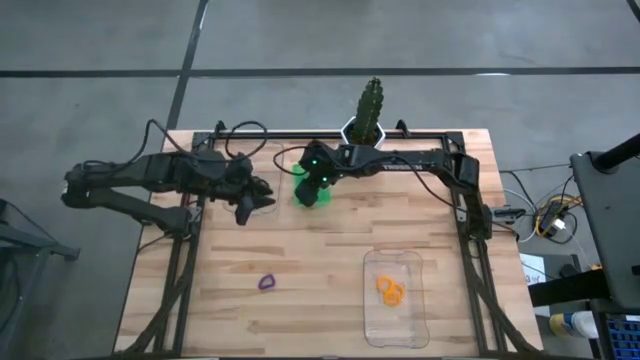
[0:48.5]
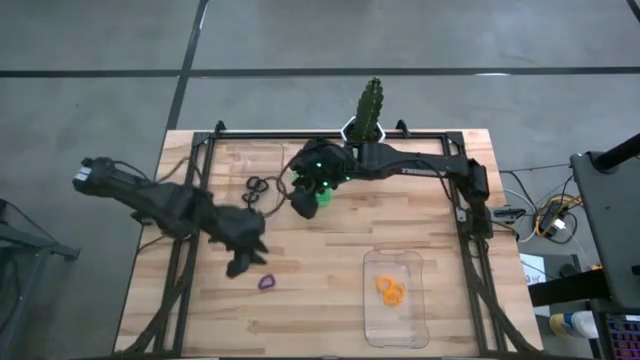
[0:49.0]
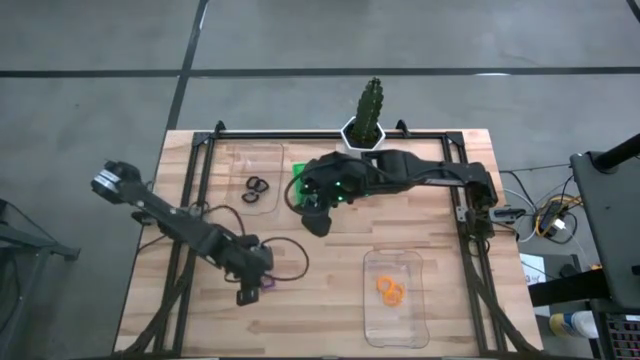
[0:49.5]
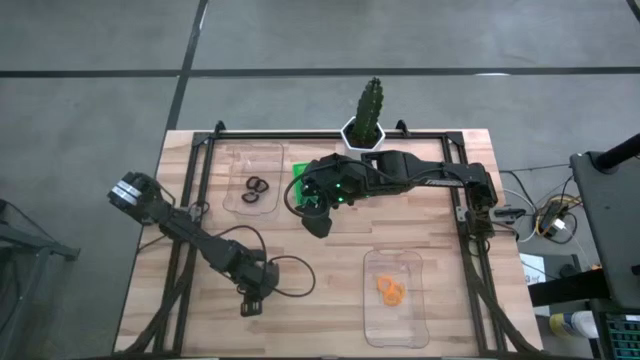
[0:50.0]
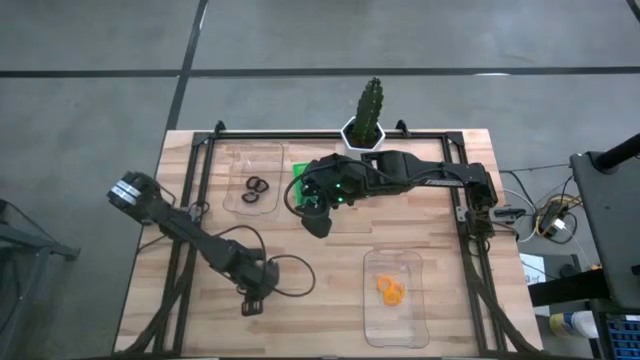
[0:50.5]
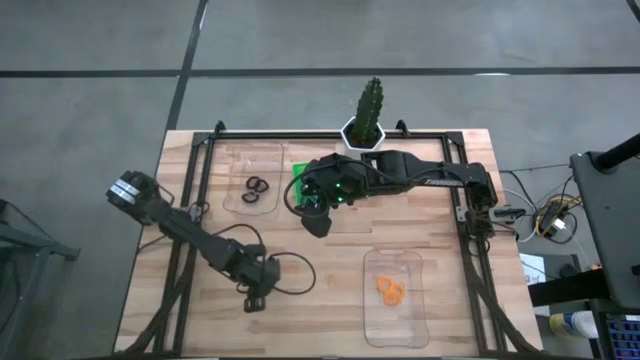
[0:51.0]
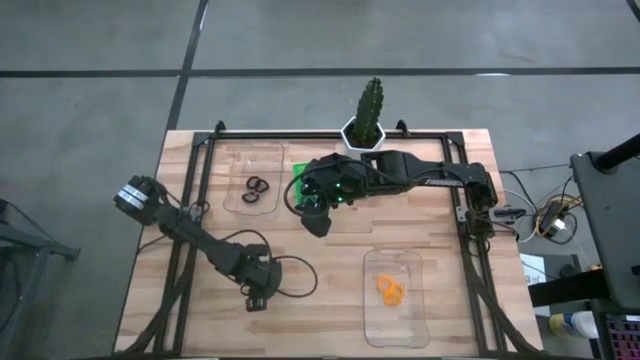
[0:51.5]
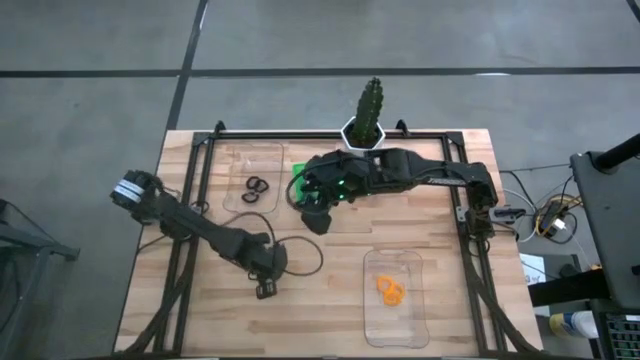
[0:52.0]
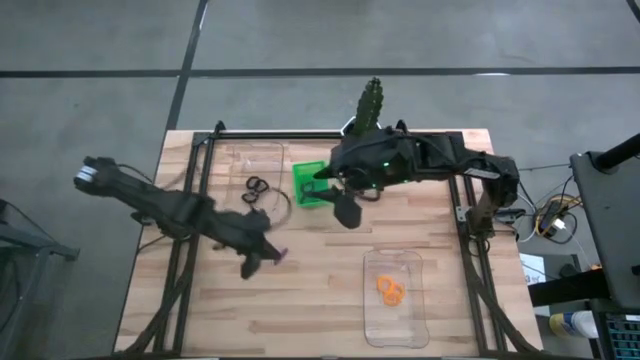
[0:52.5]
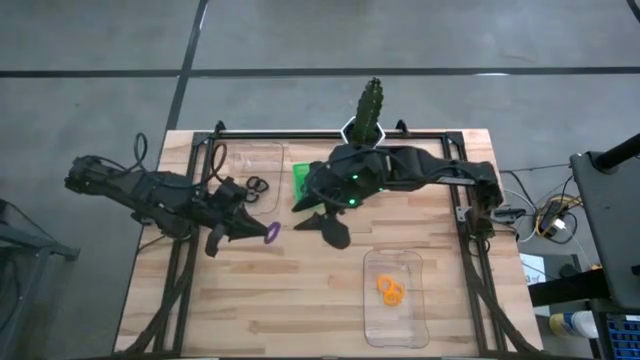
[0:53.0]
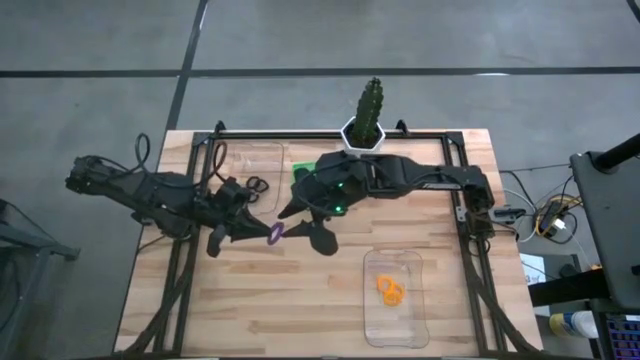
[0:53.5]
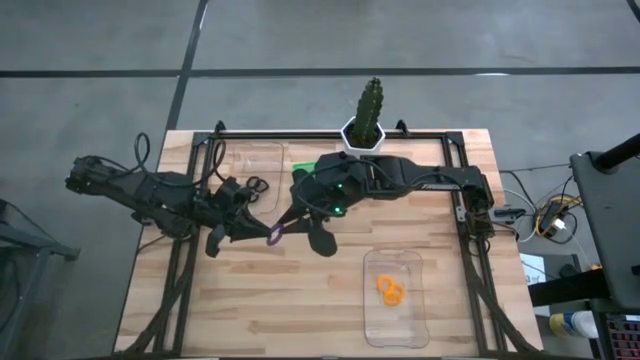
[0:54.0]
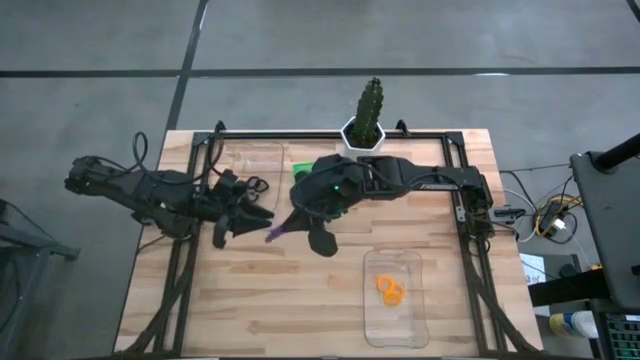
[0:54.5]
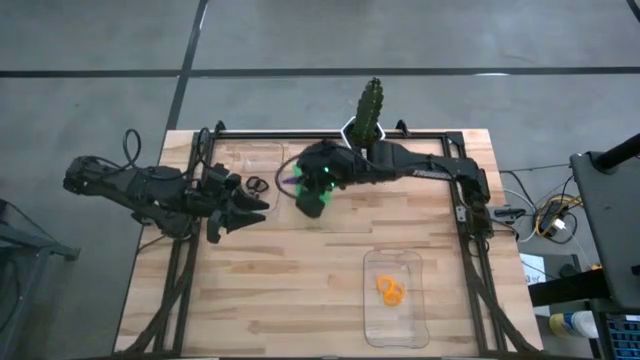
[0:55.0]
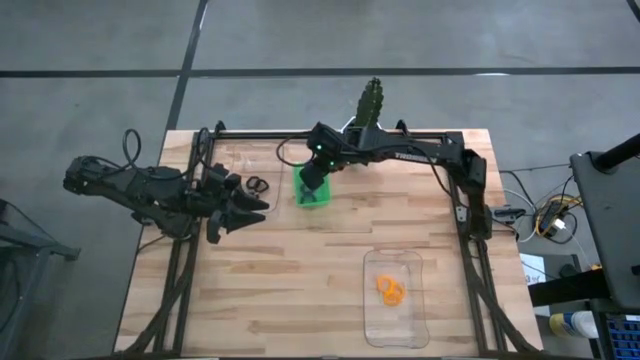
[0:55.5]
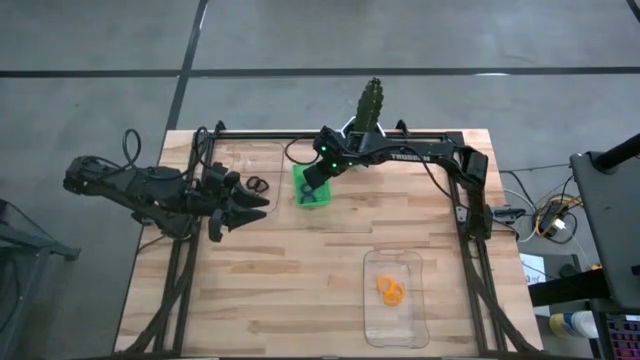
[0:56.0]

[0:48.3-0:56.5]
Task: Sort spring keychains
Put the violet spring keychain into the green bin

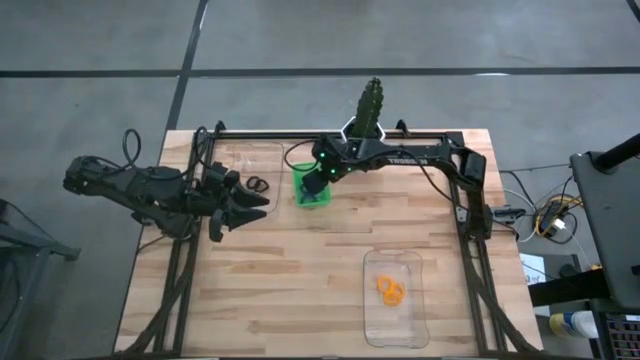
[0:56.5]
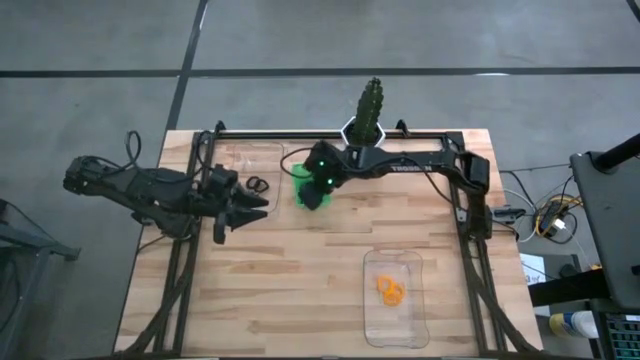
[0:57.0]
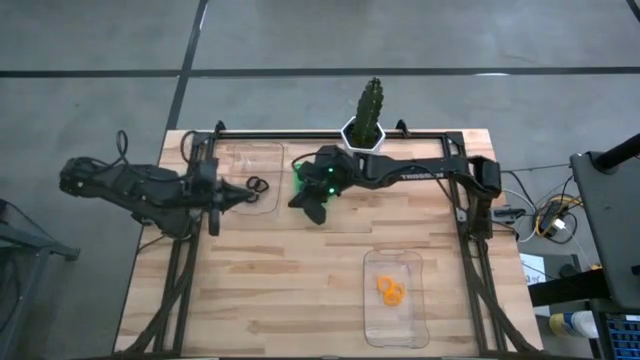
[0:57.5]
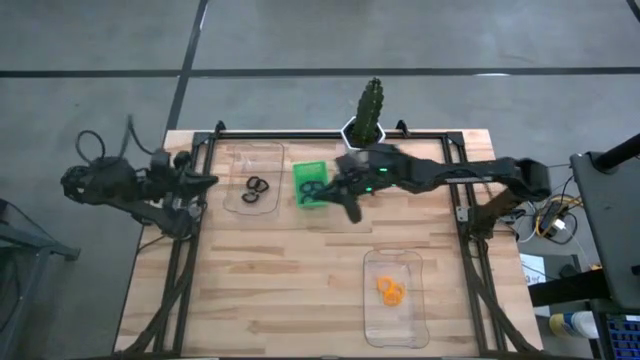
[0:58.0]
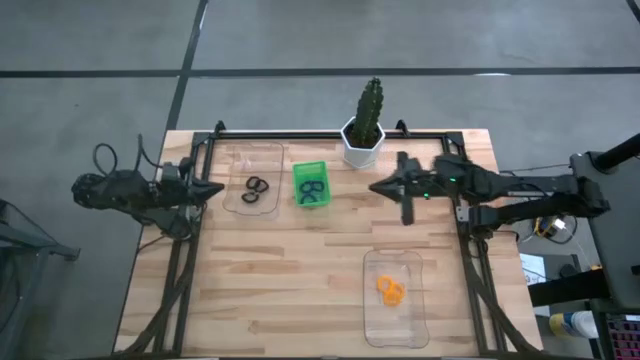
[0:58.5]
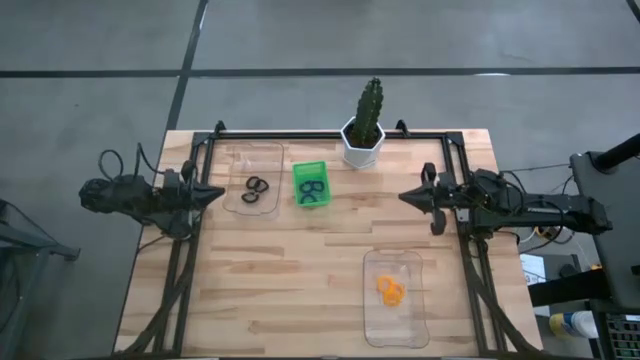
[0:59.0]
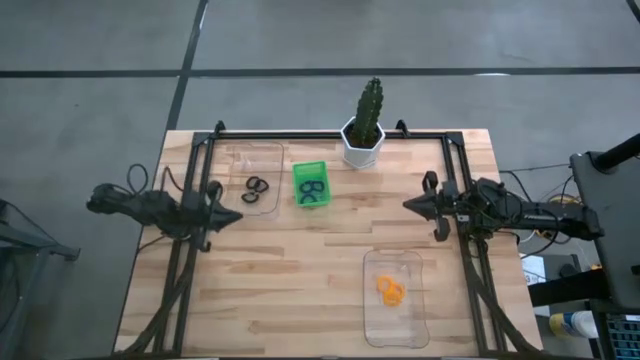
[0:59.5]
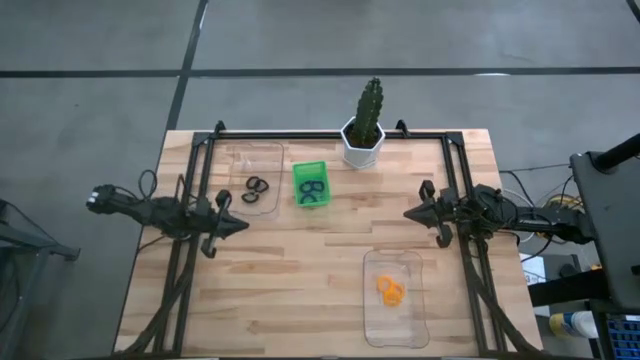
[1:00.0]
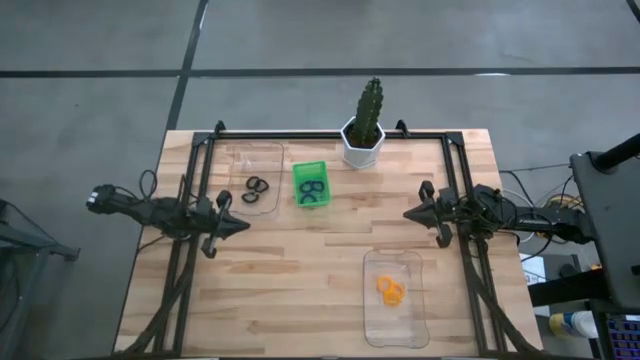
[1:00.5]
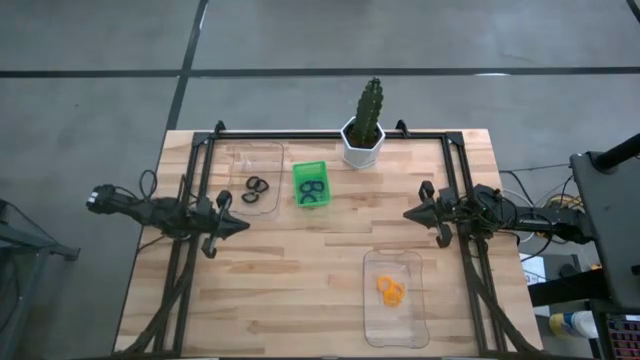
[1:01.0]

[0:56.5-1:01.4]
Return to Home Position

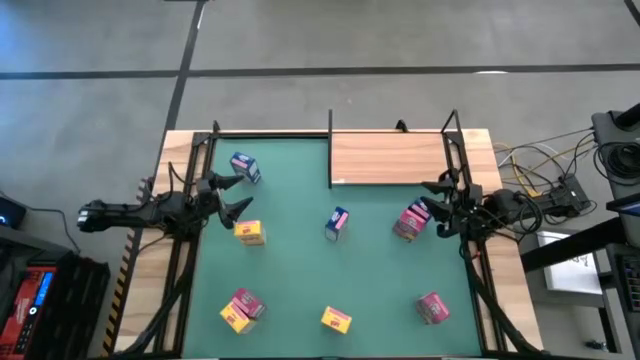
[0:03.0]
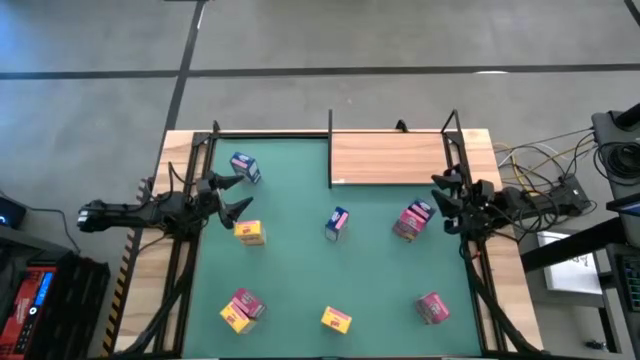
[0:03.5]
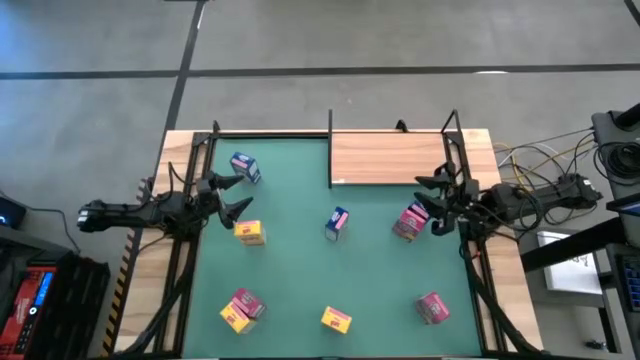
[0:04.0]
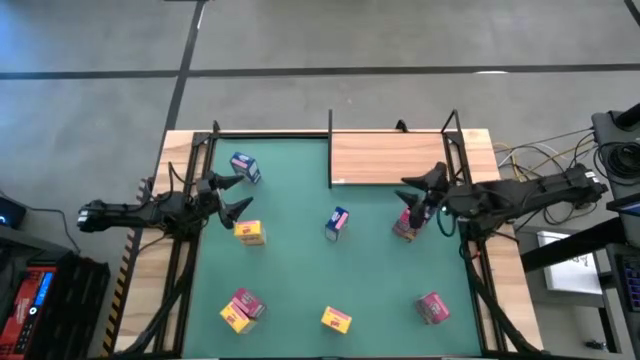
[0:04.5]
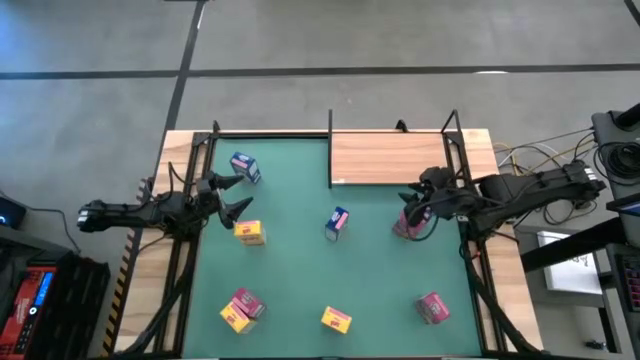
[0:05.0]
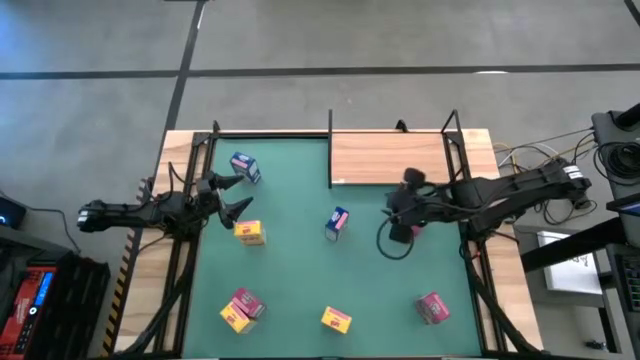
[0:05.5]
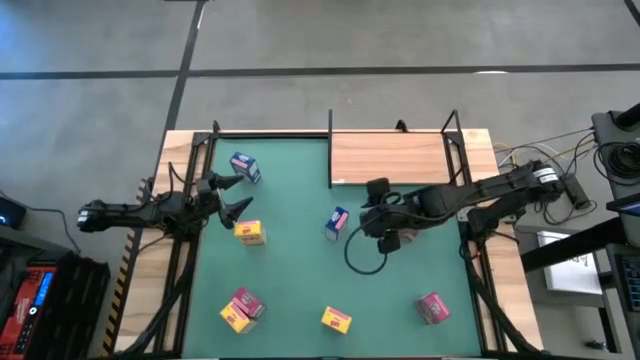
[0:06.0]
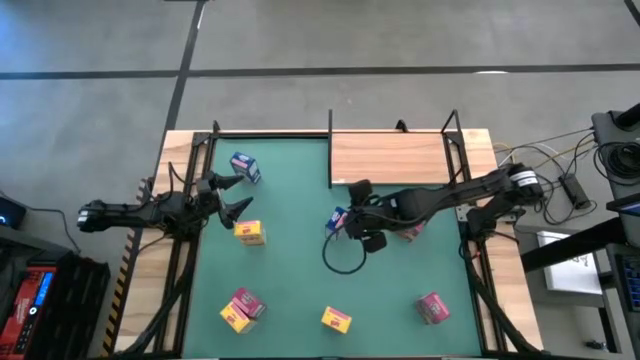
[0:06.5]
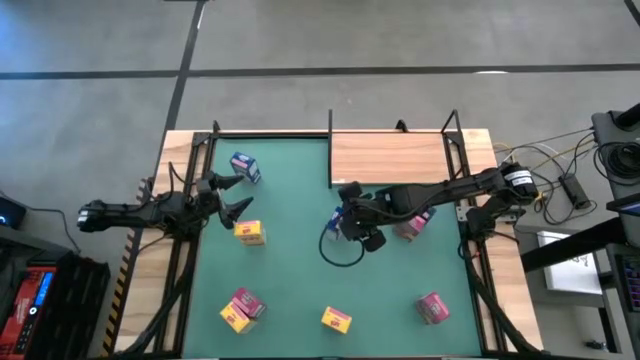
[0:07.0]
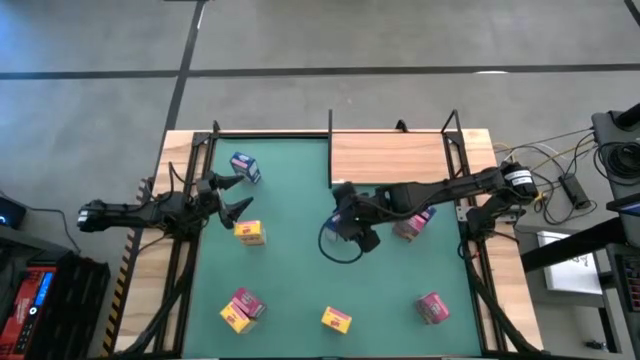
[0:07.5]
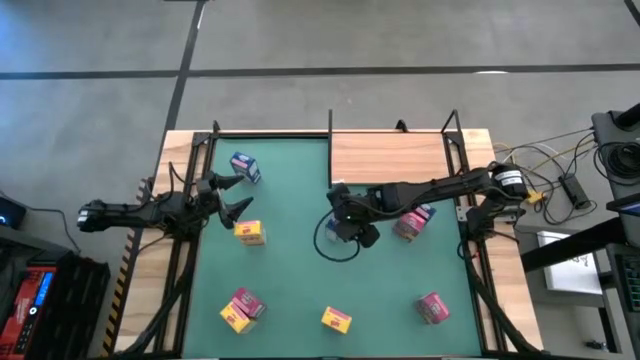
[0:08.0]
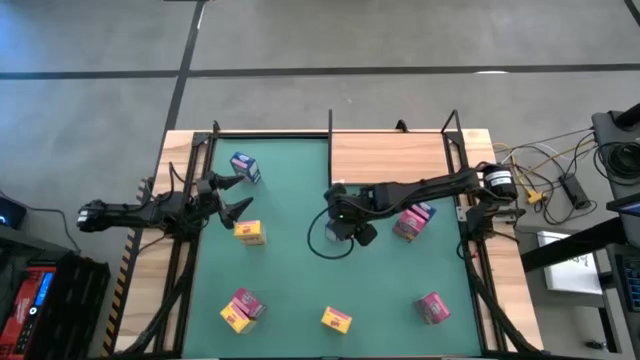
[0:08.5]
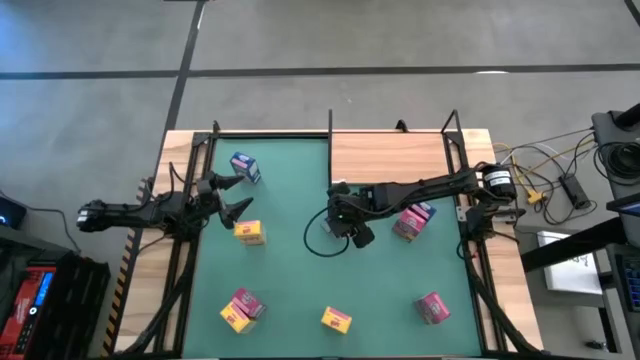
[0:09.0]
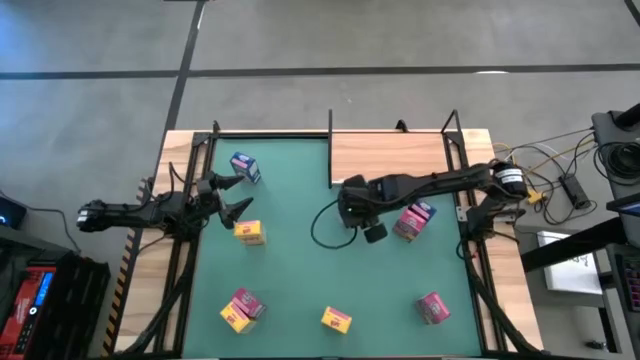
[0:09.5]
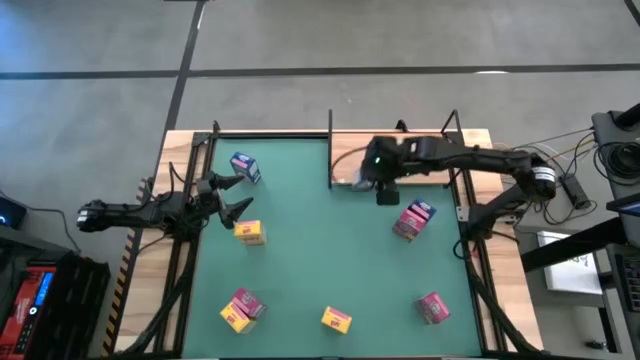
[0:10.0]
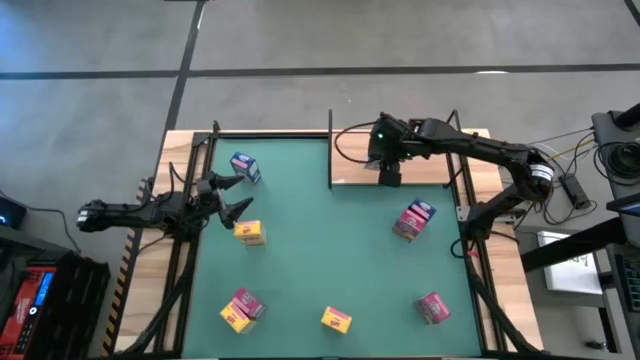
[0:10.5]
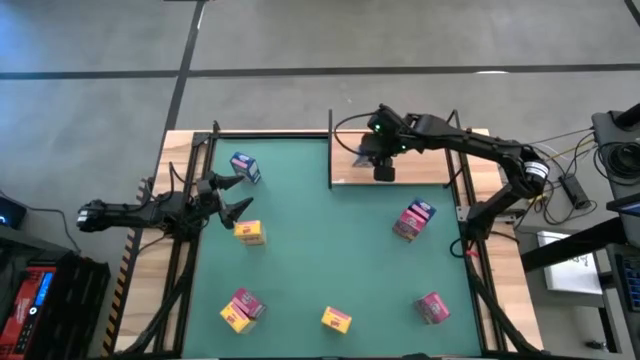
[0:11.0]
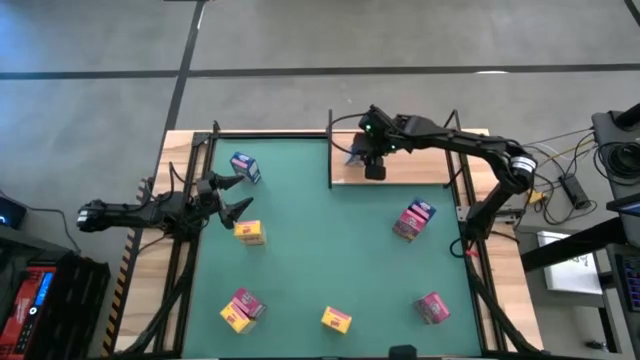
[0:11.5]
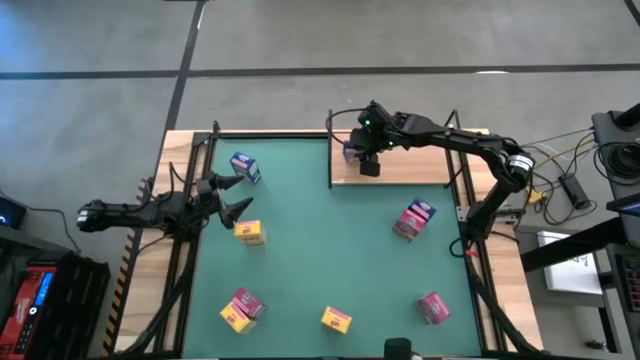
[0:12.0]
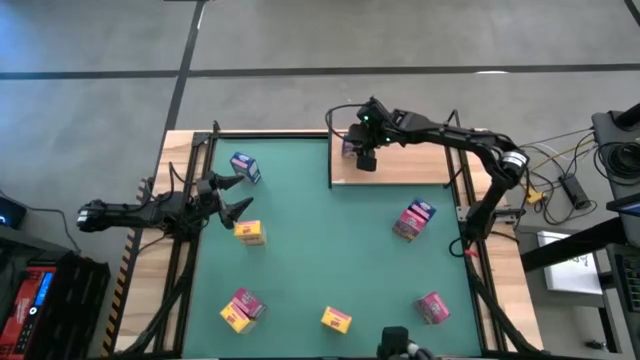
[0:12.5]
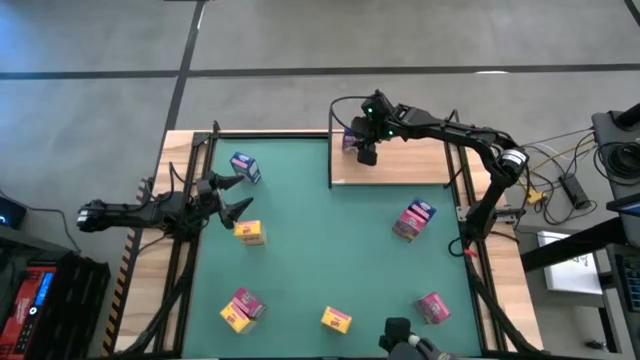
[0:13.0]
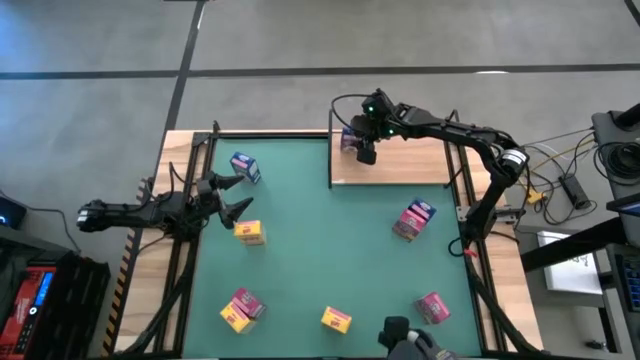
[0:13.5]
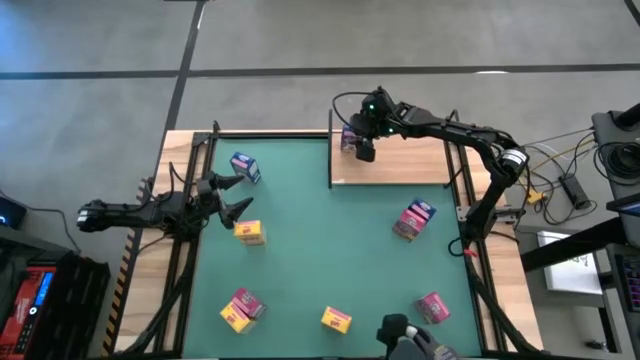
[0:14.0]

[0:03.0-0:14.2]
Task: Stack cereal on shelf
Put the center blue cereal box on the shelf
